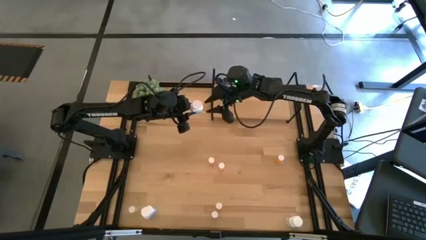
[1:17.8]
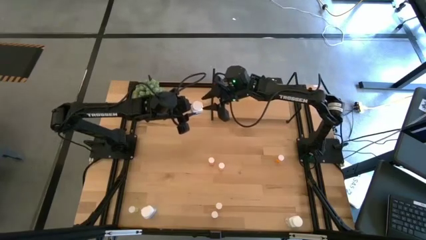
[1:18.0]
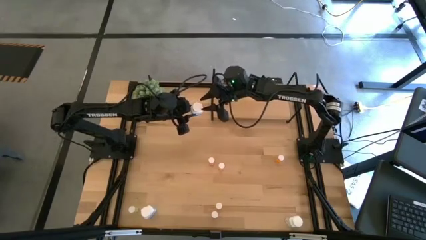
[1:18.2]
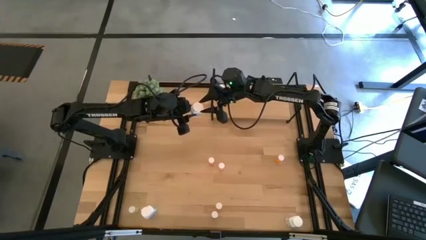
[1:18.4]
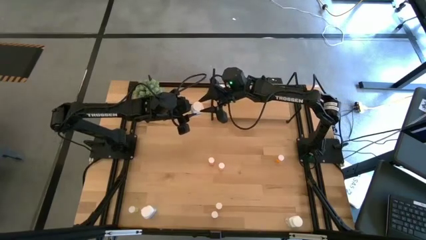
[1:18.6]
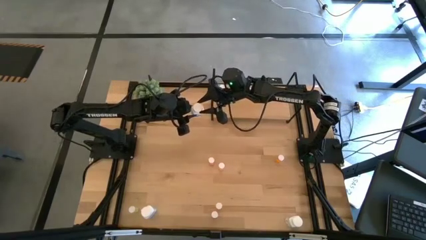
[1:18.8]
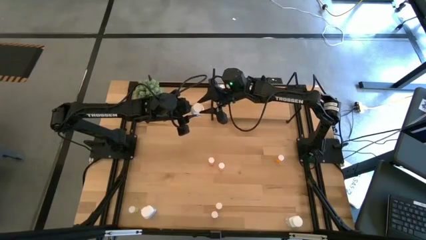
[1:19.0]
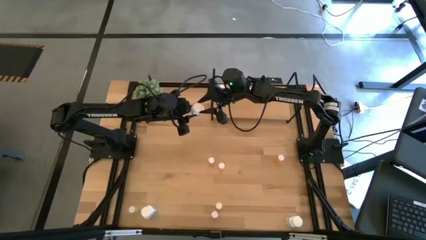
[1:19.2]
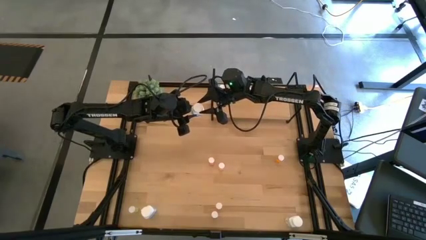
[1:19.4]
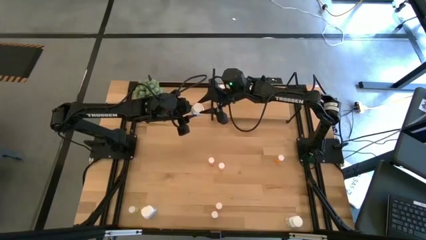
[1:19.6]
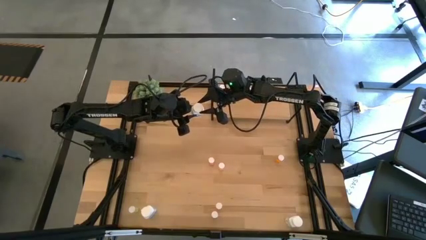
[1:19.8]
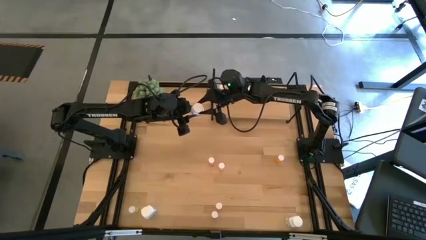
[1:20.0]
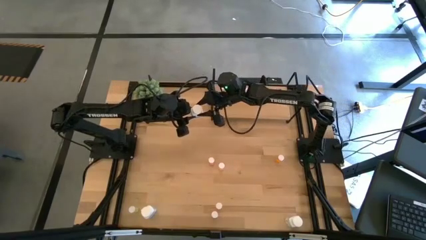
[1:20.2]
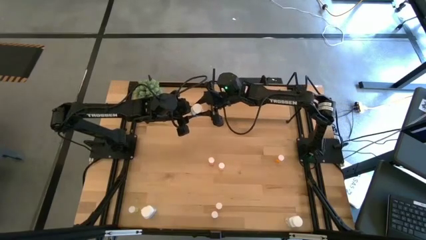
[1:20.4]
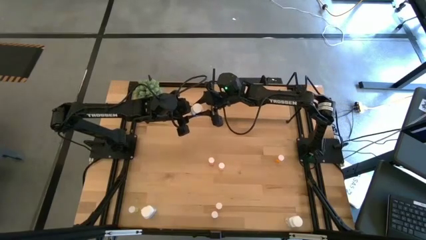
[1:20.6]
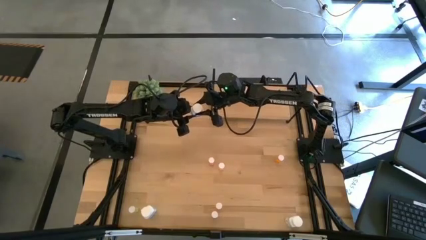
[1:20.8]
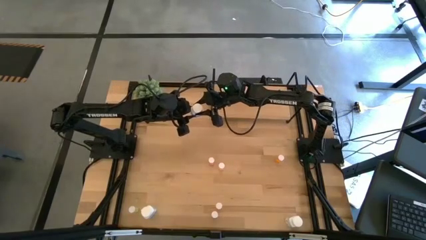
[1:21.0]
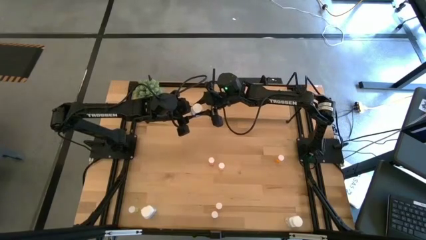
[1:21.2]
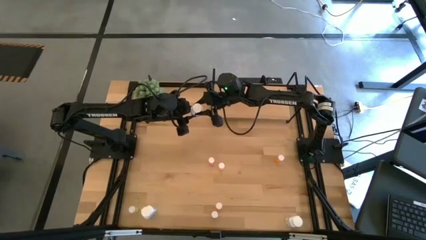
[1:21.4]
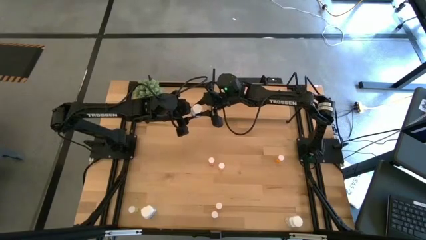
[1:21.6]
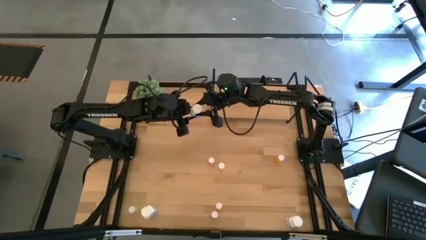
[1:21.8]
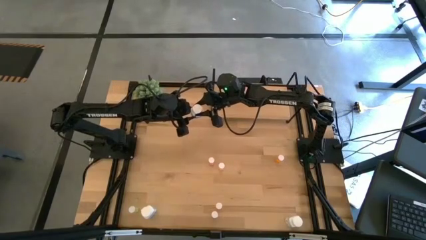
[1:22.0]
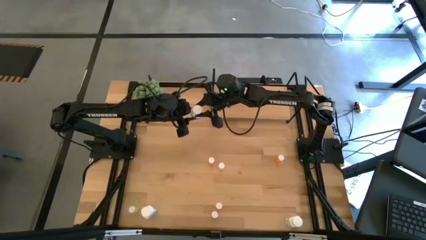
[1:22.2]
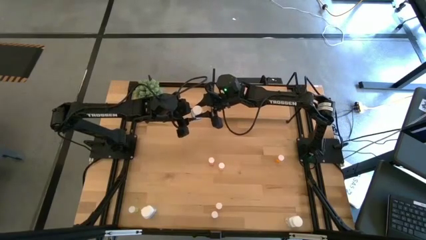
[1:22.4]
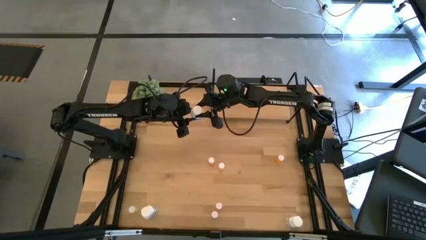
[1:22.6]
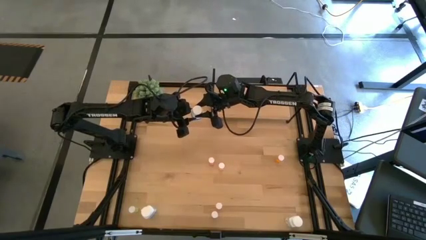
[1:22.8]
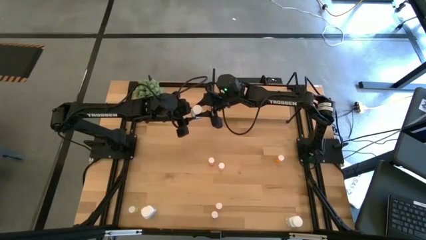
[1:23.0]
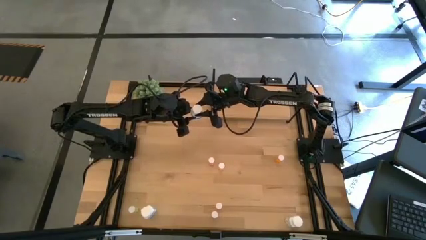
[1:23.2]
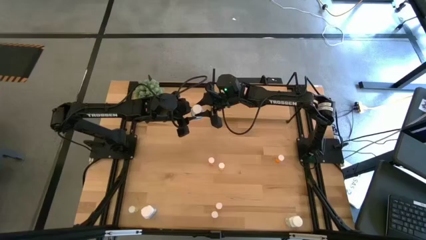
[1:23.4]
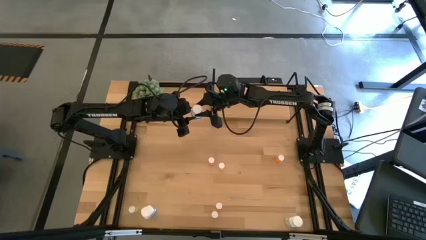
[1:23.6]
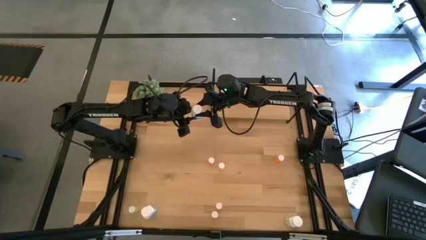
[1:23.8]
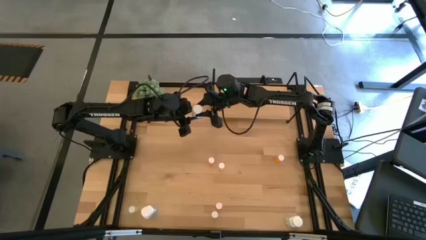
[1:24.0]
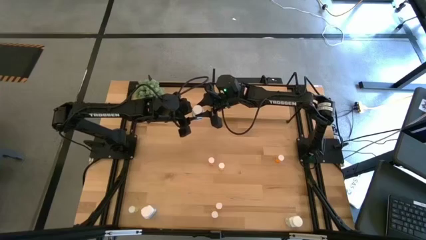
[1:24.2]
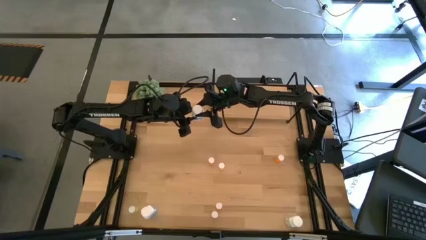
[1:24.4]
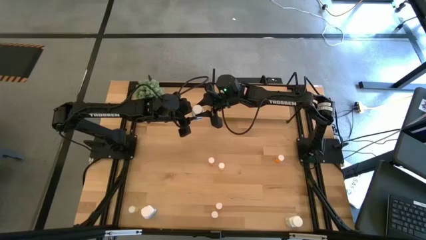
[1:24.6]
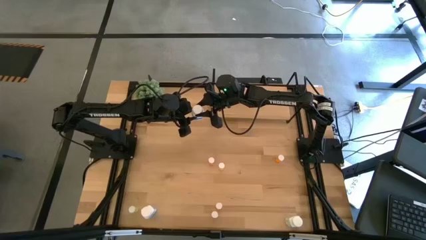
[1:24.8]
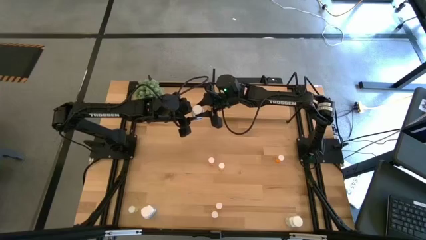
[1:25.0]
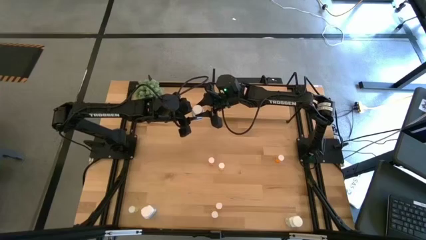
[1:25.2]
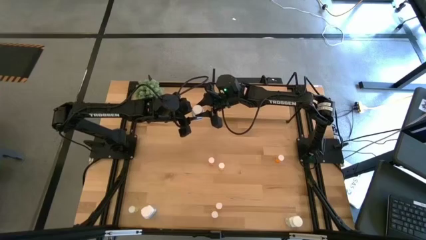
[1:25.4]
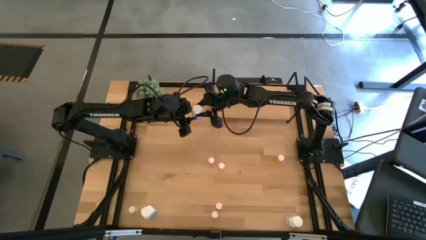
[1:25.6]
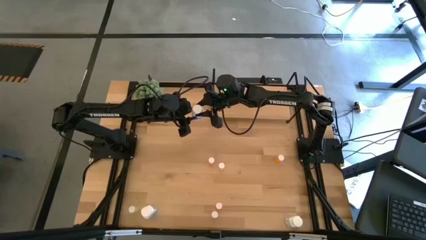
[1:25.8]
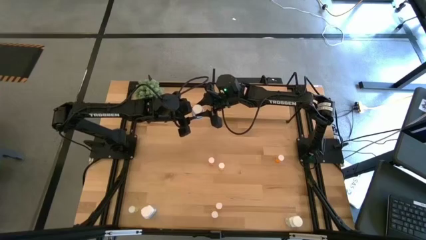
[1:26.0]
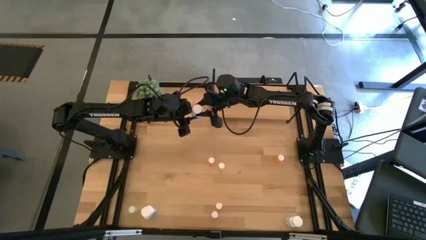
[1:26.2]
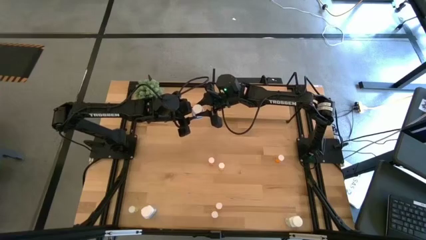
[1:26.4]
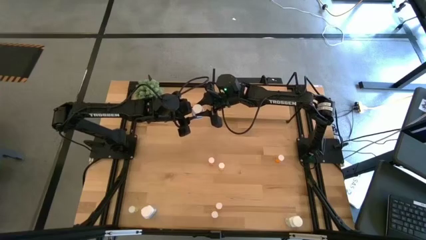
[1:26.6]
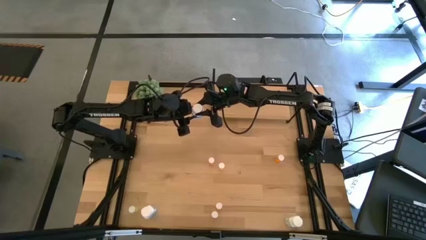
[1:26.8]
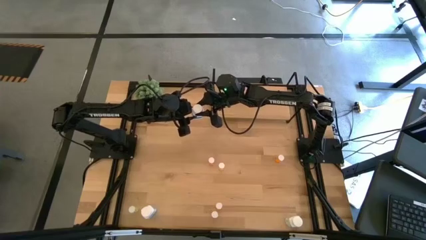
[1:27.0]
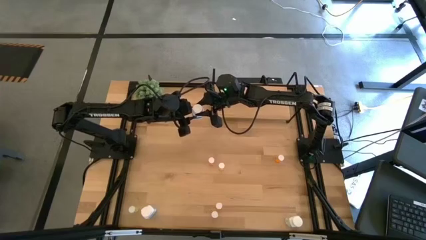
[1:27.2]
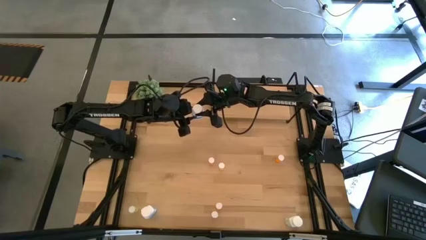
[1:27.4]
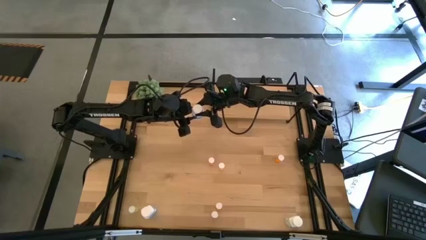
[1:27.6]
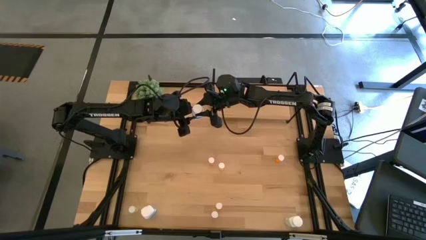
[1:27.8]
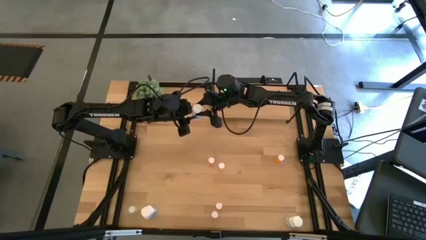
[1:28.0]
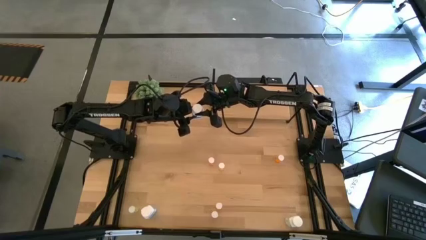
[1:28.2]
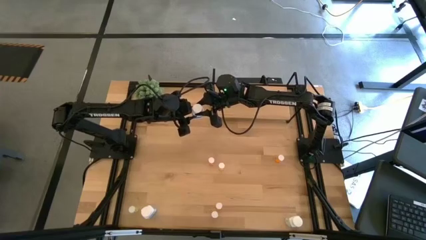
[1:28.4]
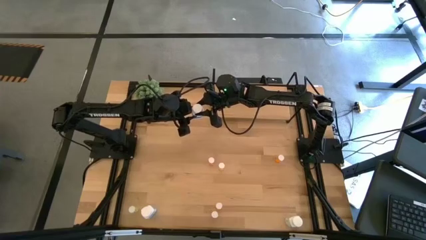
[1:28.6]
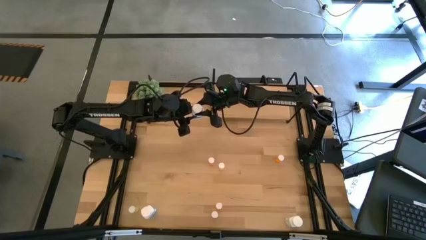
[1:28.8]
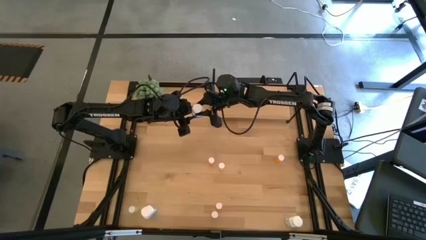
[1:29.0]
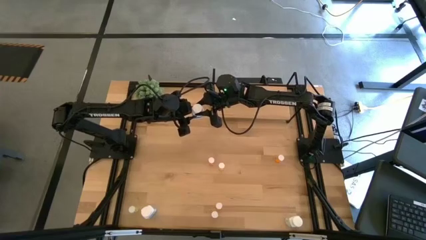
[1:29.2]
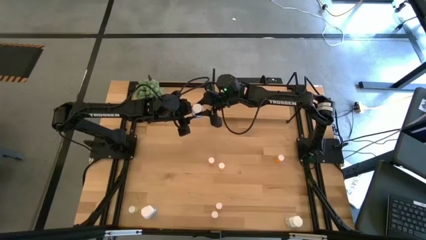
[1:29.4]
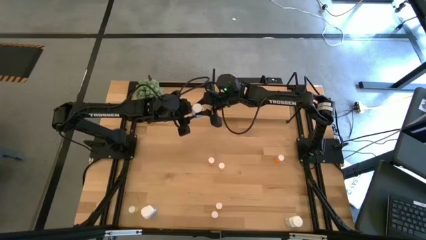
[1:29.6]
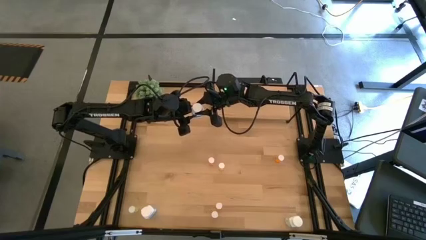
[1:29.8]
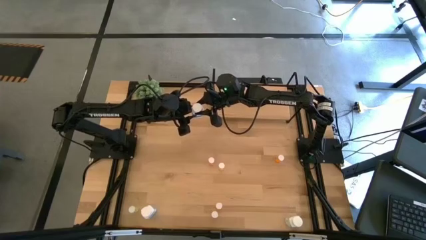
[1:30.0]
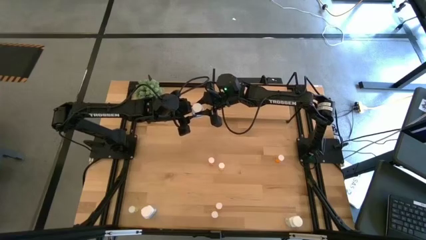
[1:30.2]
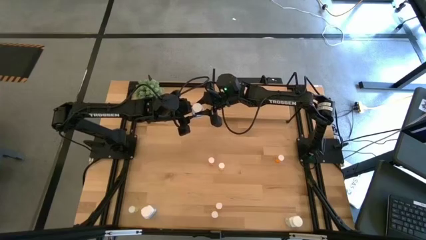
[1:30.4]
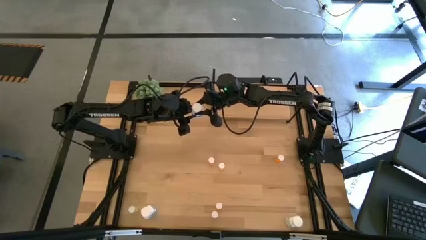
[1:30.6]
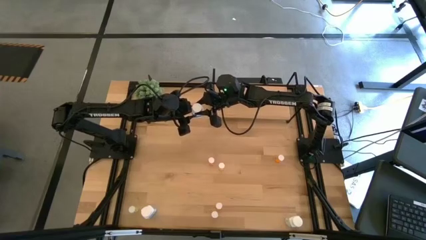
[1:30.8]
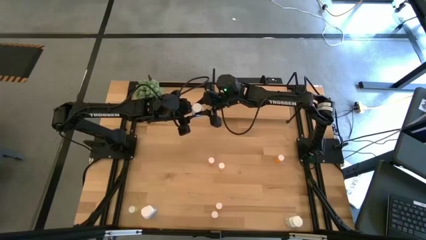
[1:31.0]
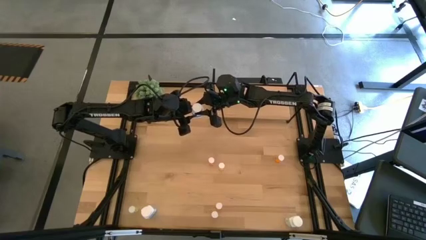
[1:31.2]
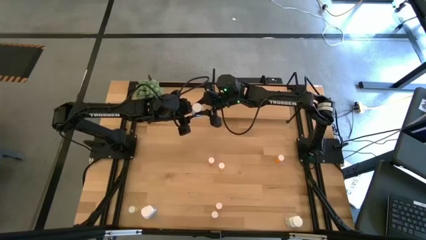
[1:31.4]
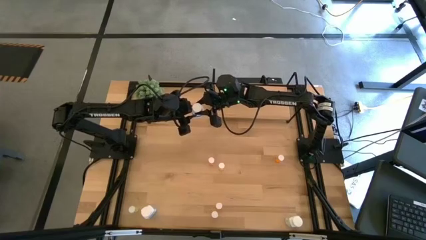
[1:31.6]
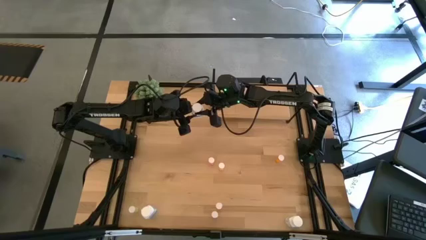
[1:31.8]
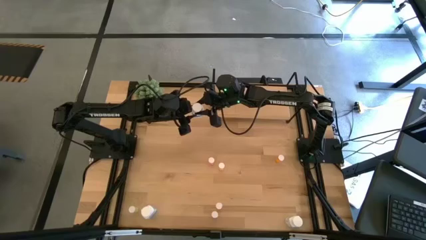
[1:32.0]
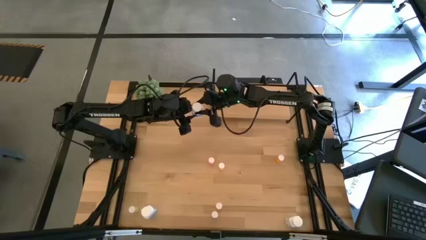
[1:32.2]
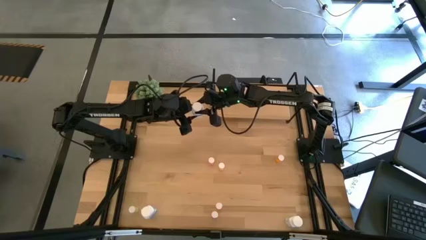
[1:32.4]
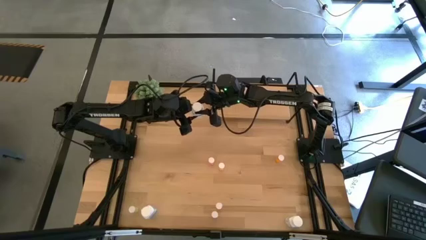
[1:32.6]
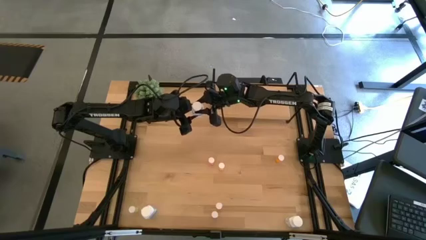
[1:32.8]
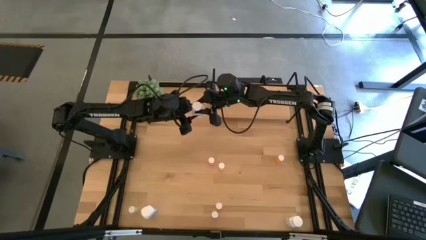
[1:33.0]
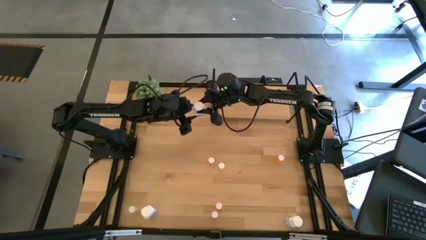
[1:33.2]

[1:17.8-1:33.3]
Task: Pick and place medicine bottles onto shelf by color
Put the top right white pill bottle on the shelf

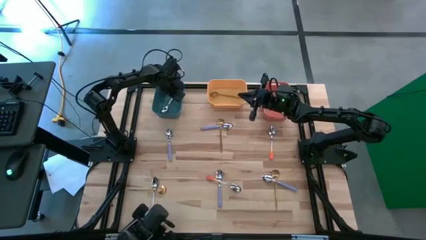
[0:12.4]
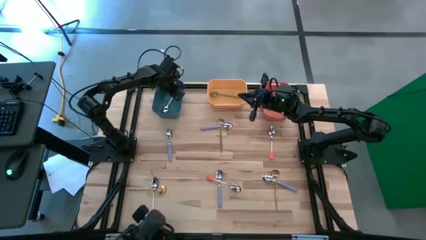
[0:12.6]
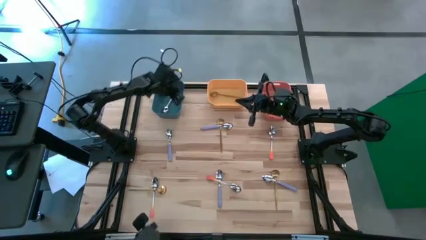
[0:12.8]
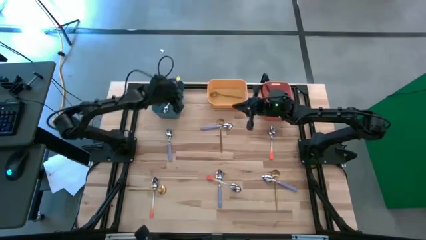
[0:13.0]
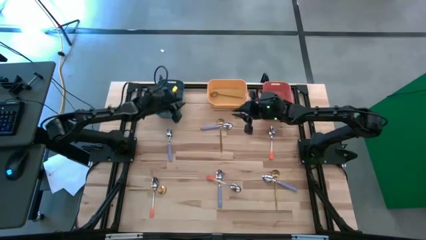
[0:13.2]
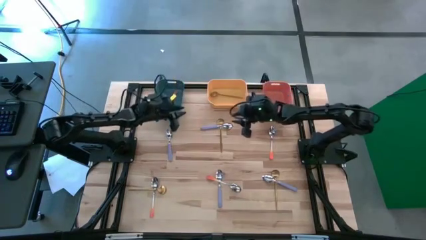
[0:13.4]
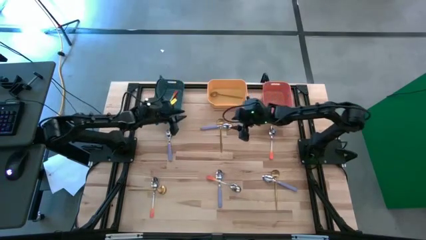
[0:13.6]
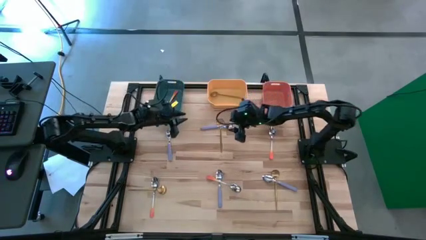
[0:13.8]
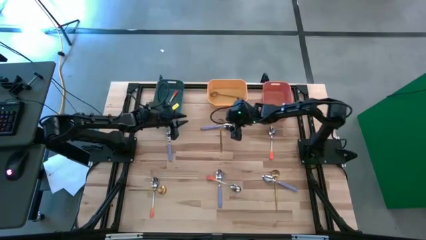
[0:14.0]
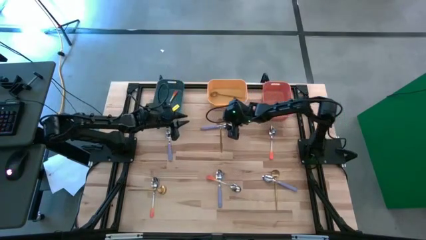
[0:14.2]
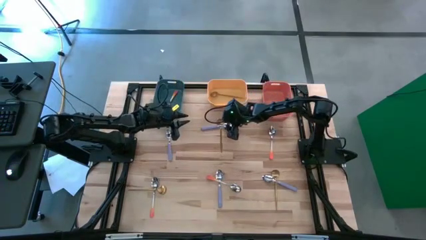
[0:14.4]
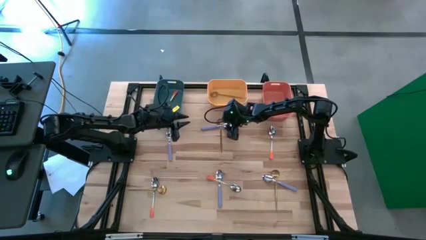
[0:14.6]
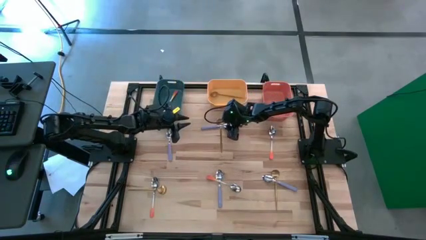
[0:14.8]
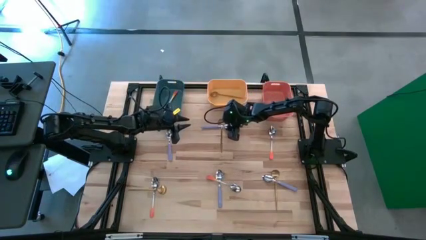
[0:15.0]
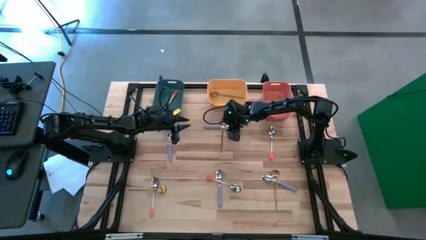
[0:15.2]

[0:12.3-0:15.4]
Task: Sort silverware by color (type)
Put the top right purple spoon into the orange bin
